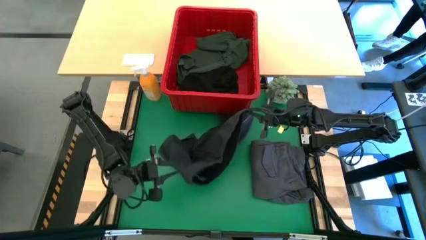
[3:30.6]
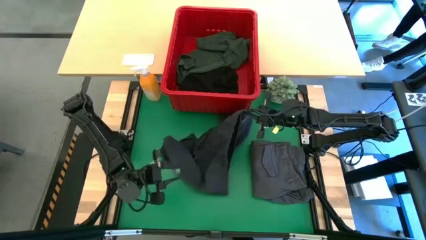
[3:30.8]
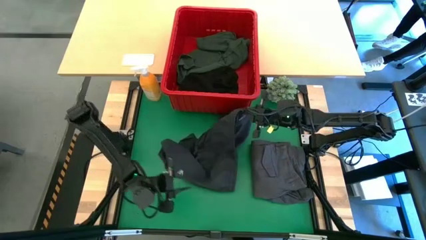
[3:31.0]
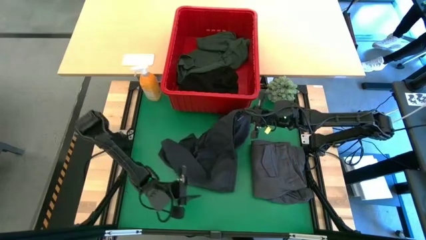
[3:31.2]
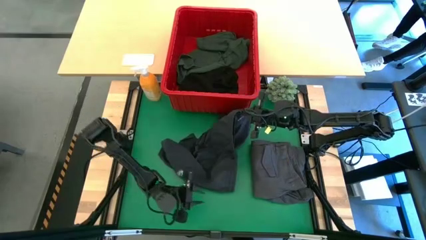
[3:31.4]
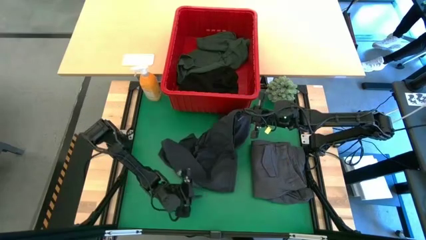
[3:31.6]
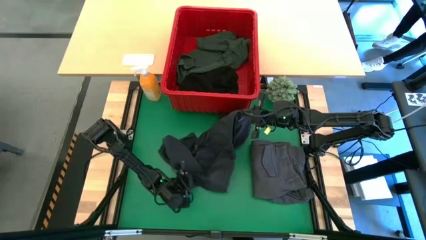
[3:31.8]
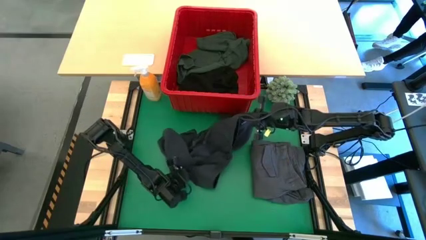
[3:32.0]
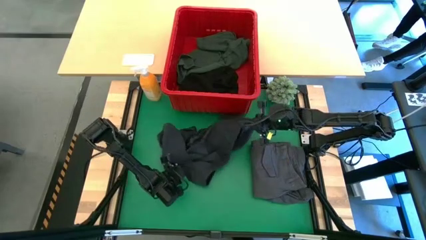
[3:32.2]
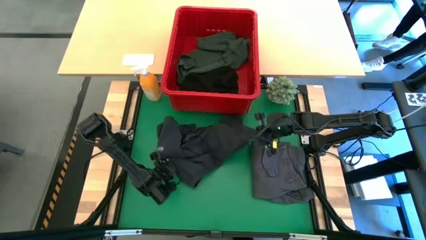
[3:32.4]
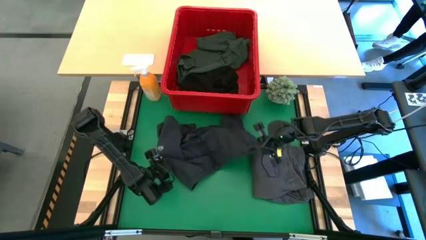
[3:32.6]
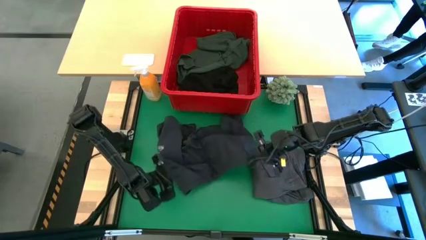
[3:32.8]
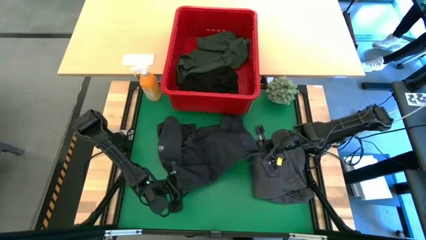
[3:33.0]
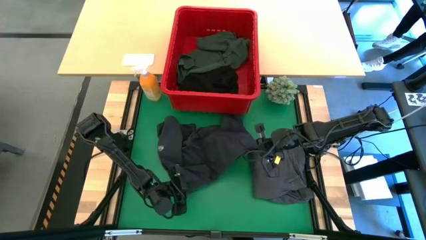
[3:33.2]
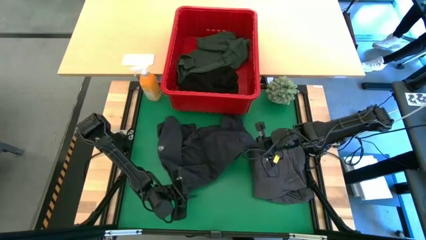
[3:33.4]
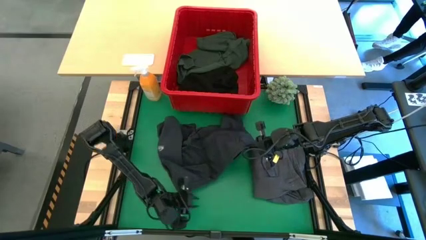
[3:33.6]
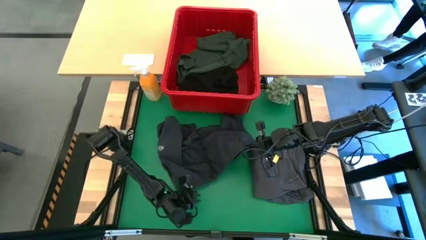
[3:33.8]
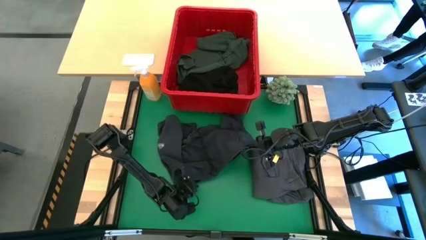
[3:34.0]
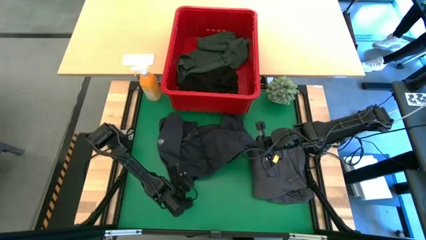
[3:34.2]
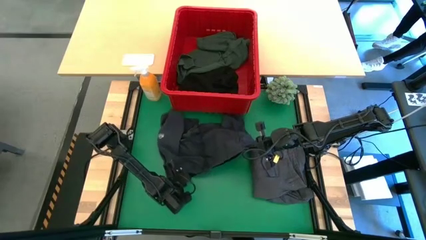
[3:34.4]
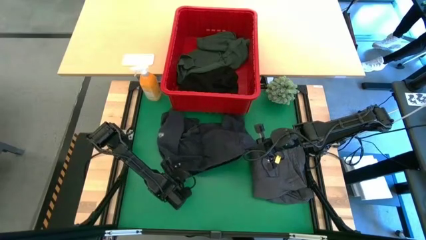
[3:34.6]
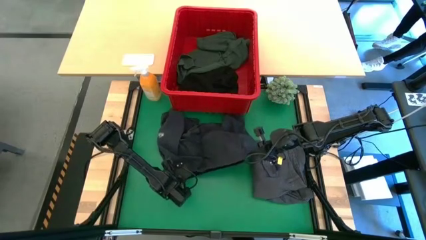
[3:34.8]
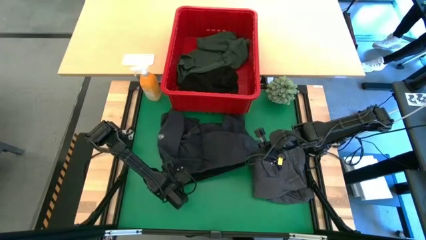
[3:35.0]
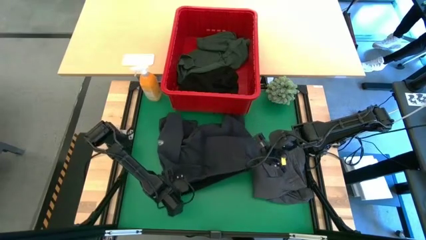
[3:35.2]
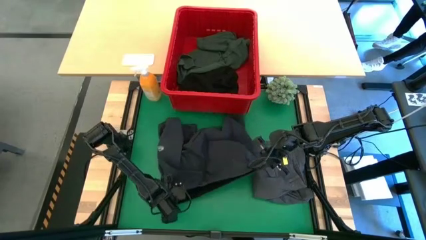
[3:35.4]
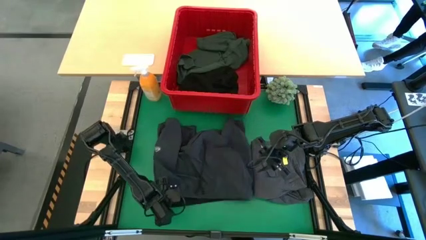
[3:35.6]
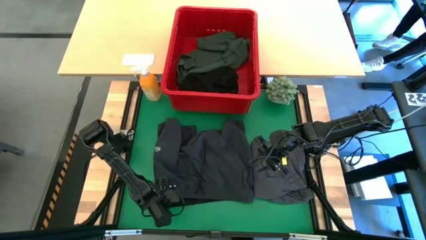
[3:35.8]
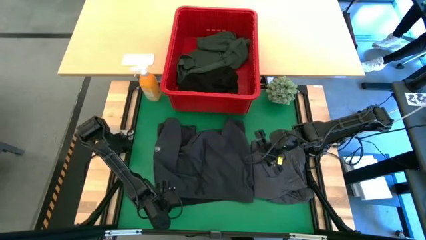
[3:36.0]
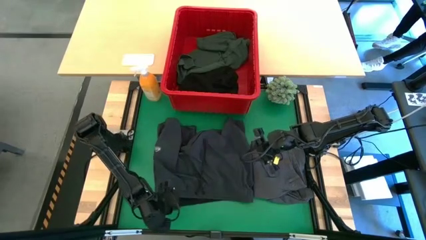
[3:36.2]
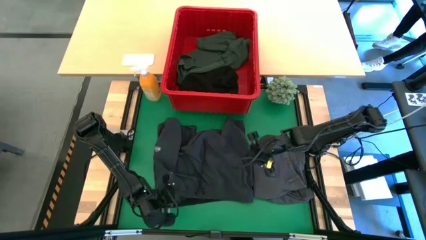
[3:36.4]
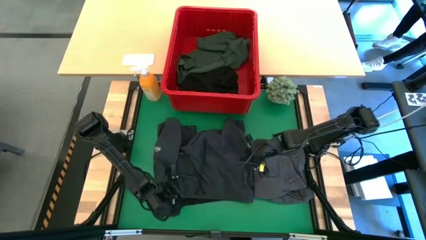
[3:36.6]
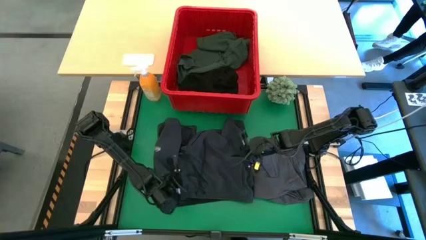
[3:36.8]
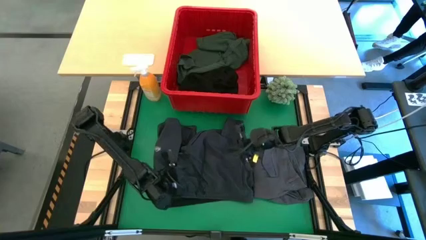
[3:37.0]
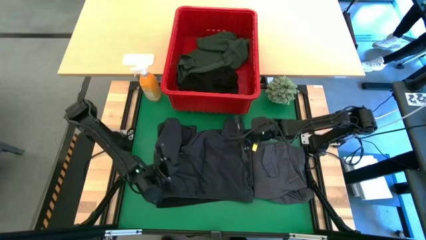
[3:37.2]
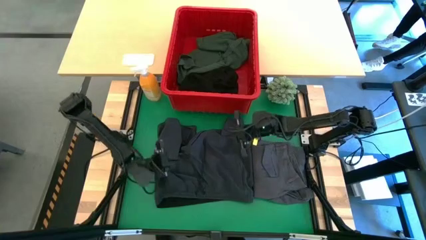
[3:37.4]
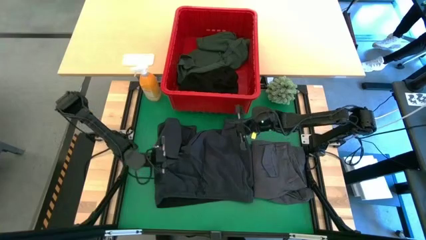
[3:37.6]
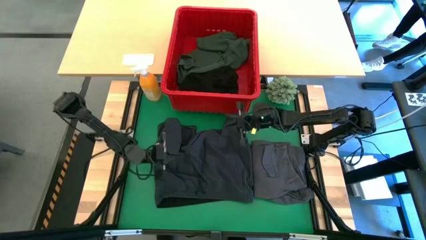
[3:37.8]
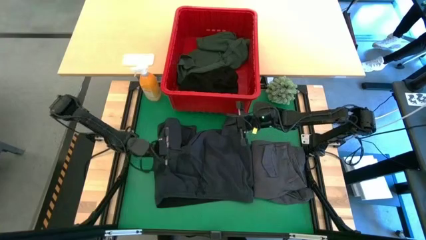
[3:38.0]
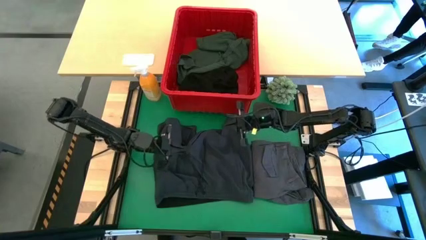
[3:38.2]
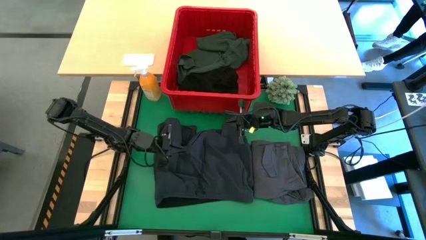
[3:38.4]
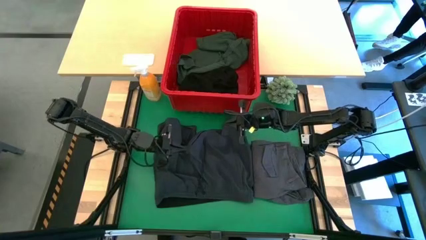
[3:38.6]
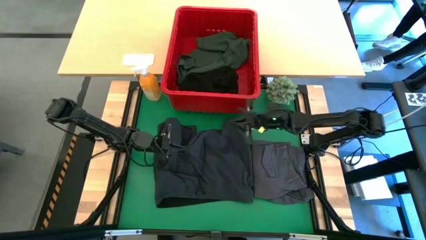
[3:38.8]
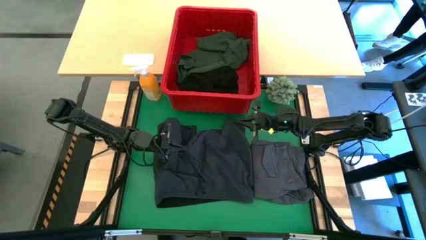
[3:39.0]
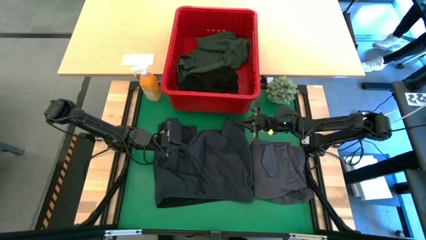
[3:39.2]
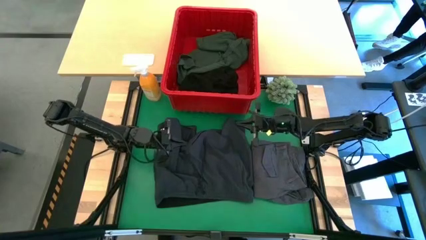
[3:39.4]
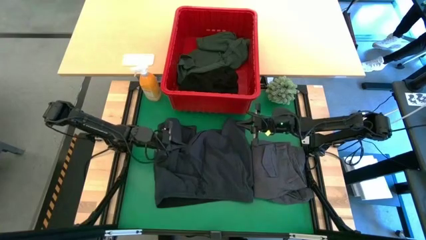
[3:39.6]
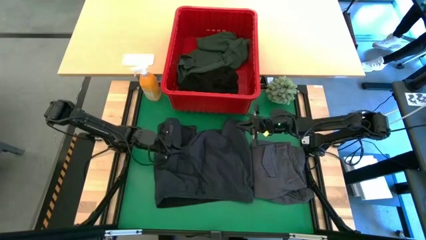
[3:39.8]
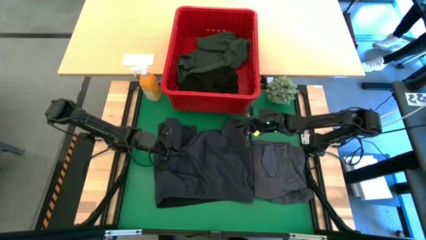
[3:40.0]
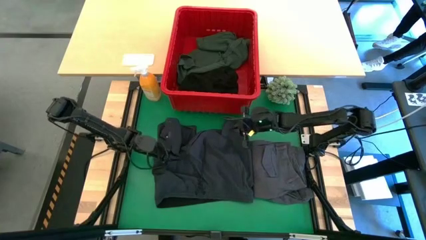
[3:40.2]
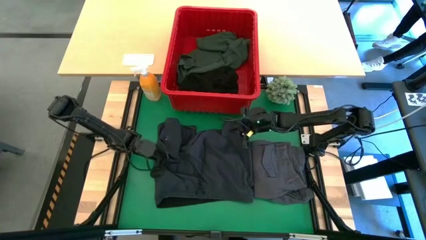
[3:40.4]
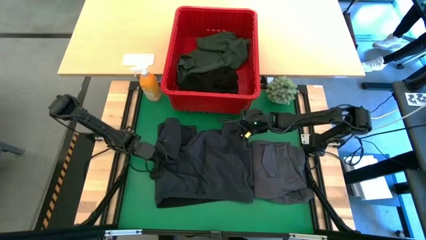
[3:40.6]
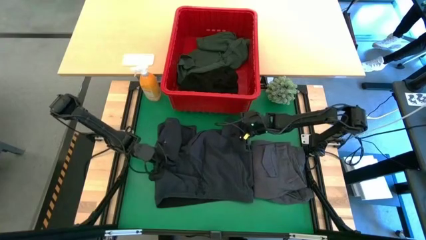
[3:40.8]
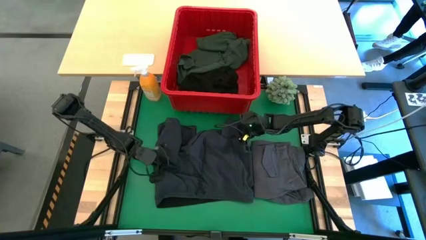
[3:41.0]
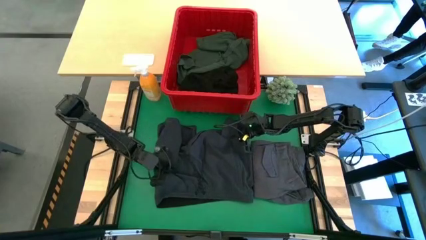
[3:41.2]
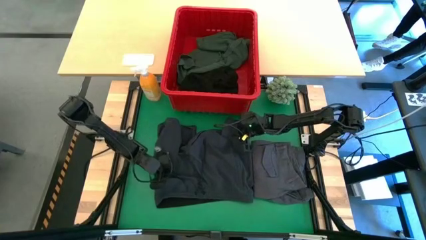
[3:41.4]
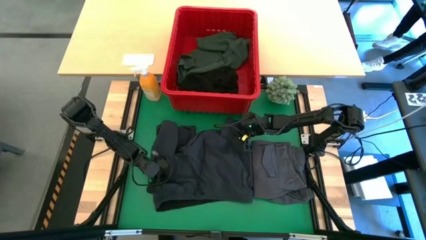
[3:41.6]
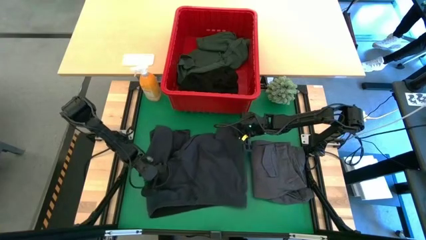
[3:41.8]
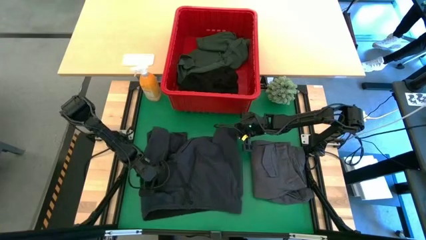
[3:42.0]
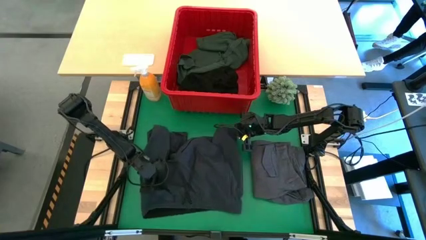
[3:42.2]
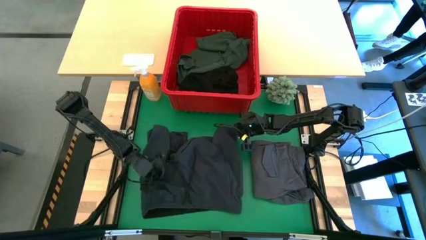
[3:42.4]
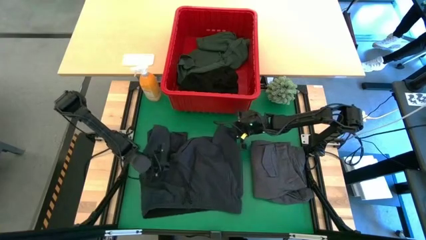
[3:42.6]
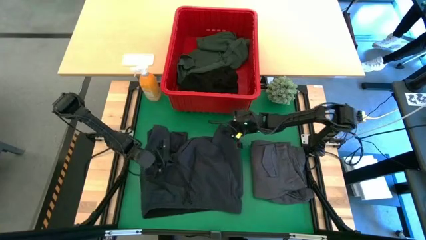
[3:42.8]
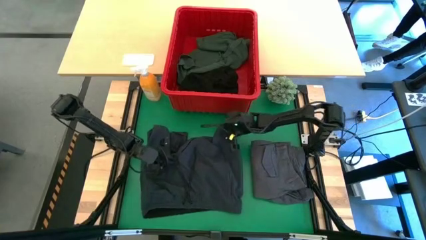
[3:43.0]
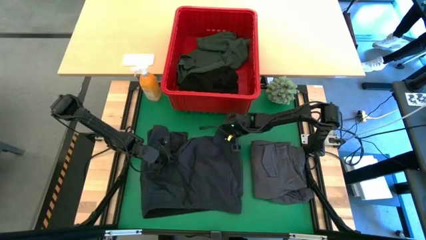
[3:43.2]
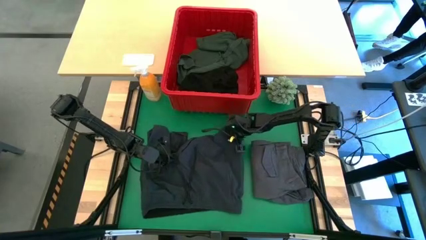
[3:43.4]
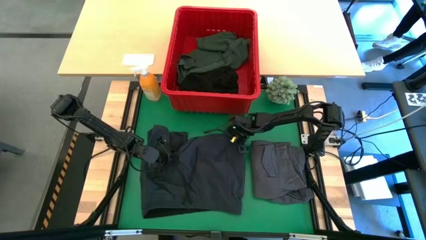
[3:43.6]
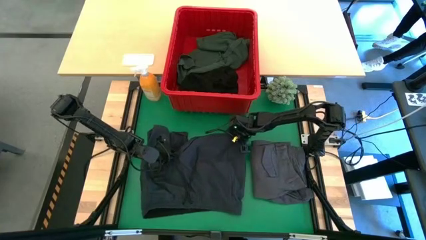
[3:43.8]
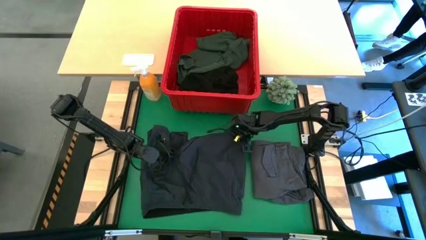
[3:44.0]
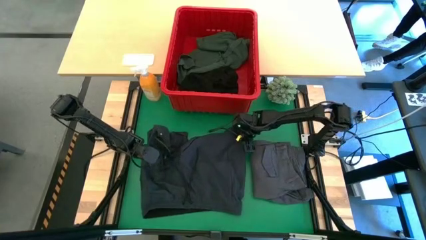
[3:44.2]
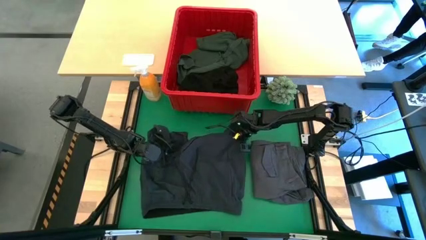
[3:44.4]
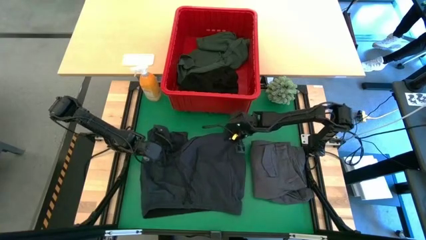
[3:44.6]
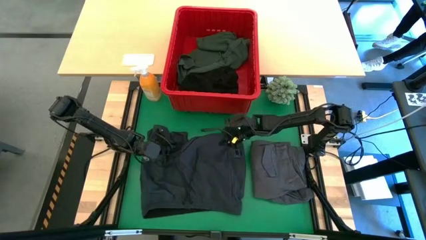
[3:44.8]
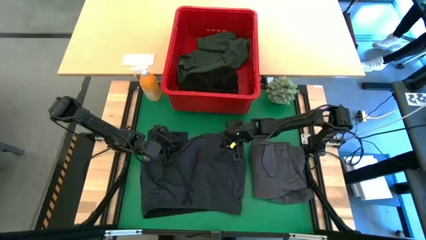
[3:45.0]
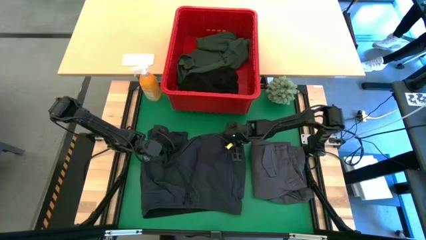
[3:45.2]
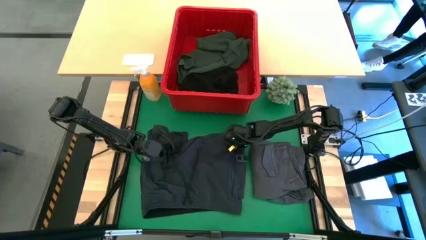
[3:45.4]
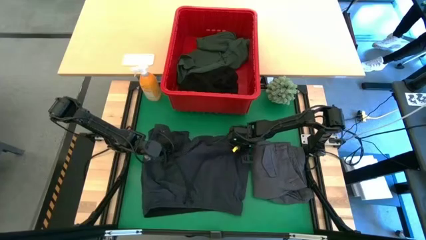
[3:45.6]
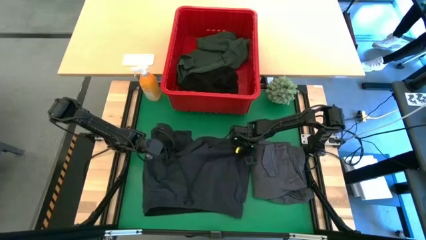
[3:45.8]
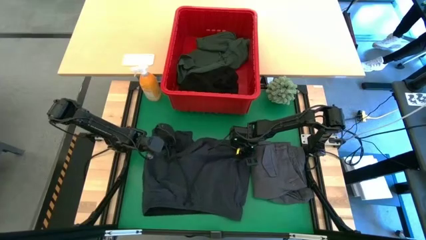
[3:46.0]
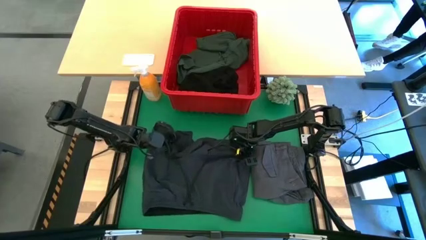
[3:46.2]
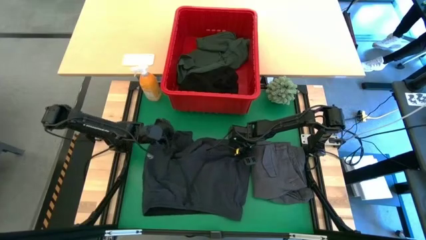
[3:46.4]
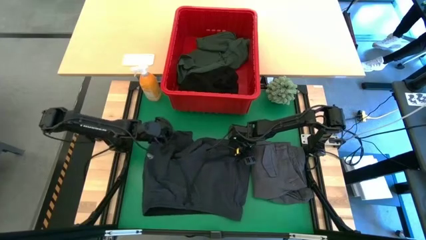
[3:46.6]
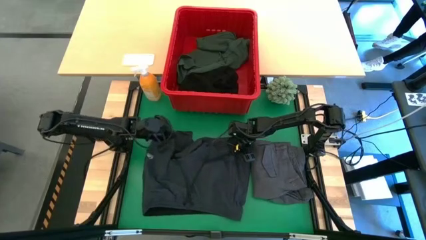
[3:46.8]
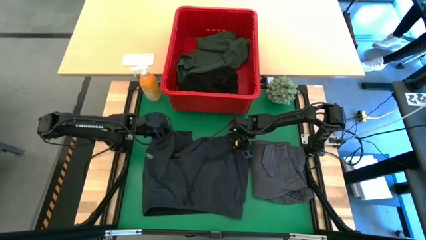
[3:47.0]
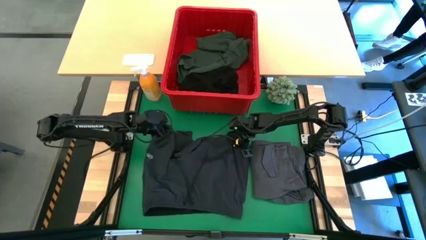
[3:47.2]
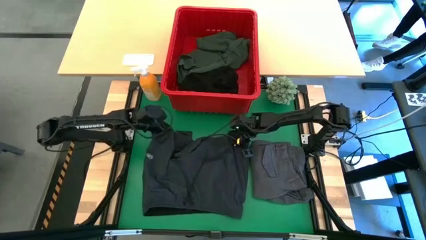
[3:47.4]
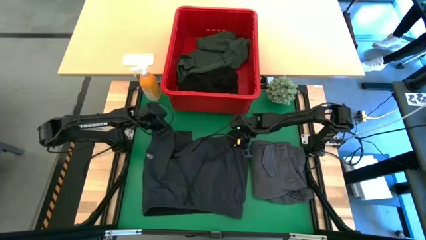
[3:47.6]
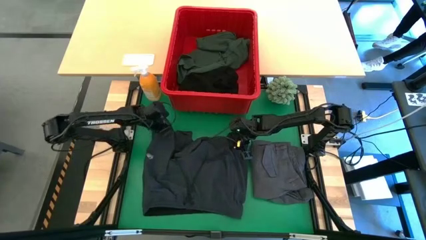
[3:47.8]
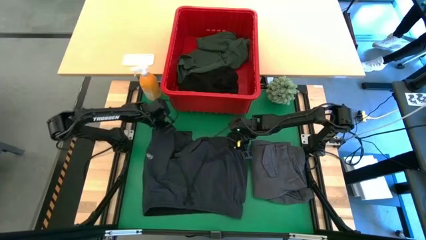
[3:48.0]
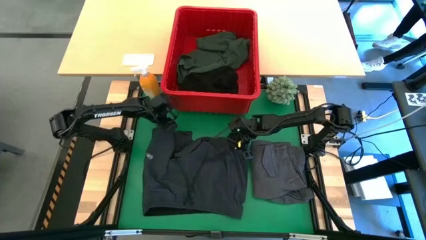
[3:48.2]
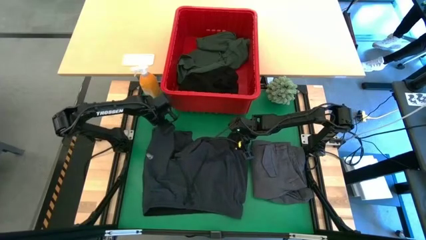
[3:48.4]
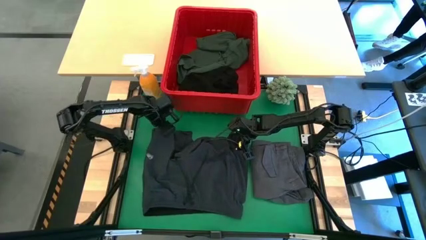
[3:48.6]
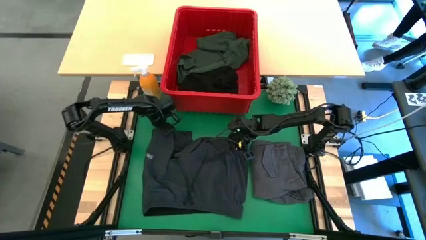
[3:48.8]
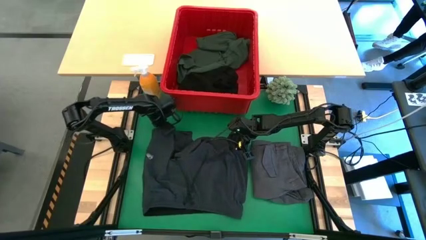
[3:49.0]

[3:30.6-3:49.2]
Task: Fold Laundry from Bin
Fold the dark gray short
